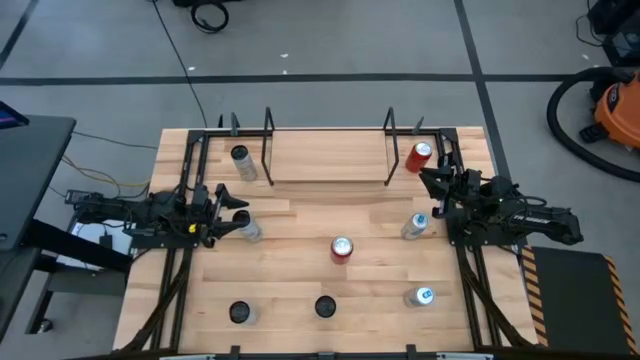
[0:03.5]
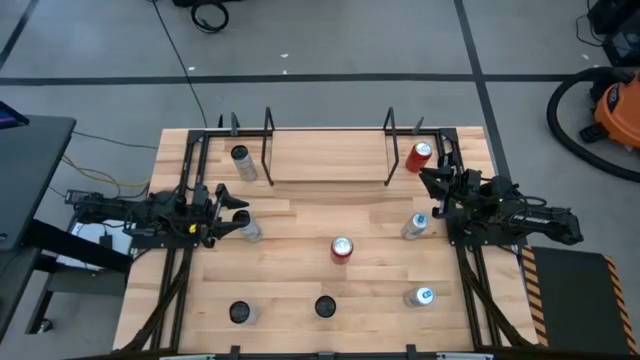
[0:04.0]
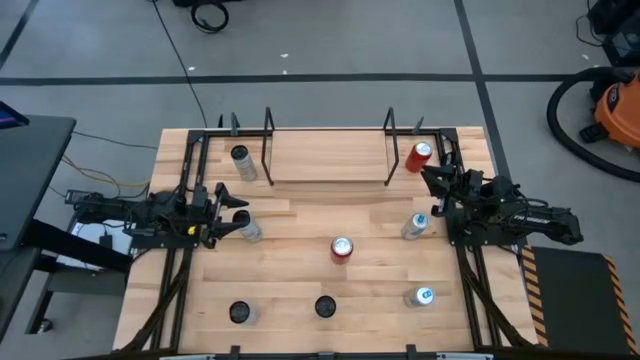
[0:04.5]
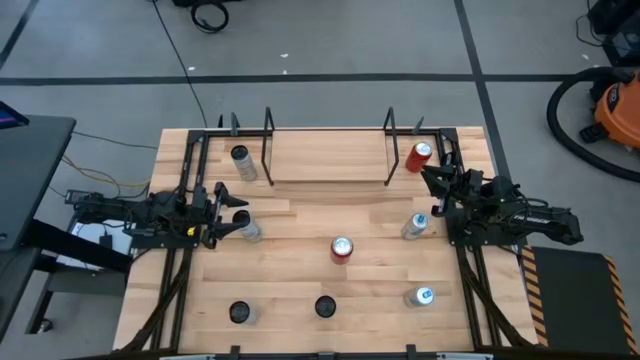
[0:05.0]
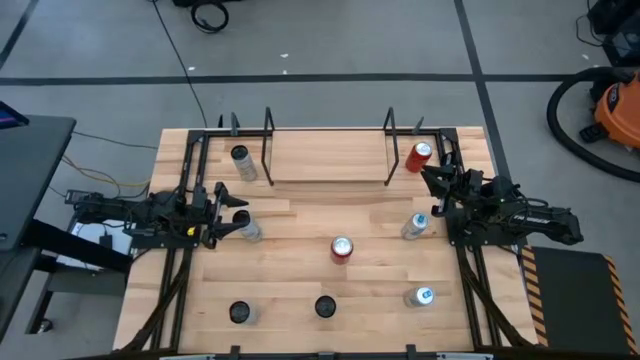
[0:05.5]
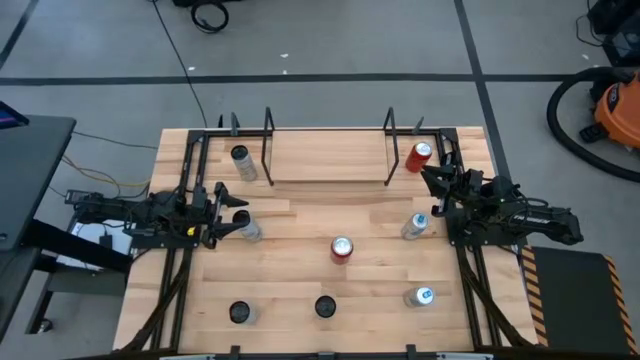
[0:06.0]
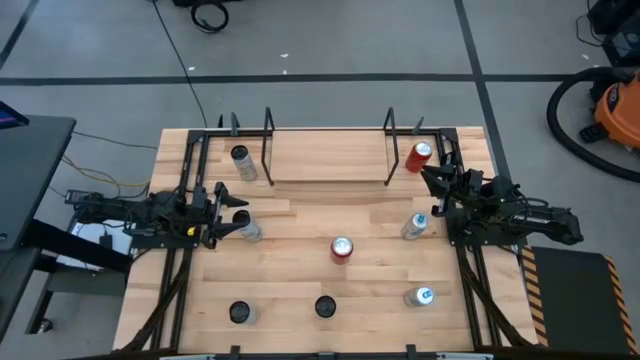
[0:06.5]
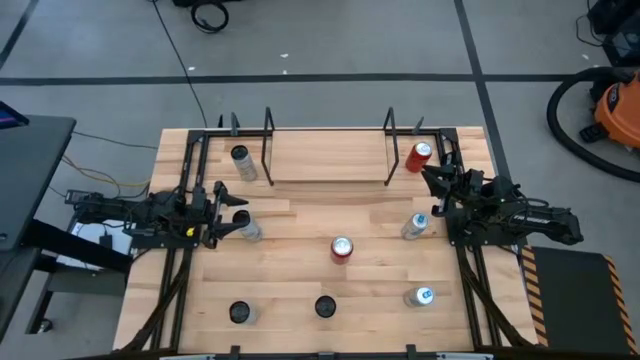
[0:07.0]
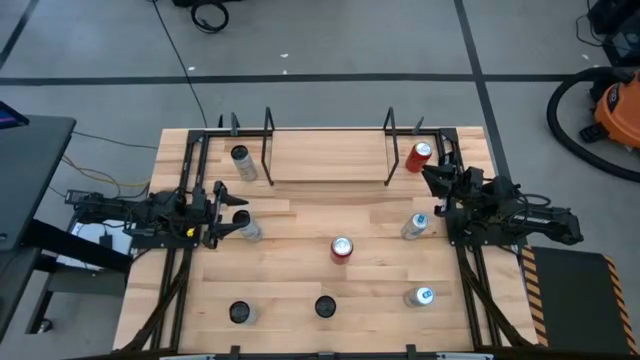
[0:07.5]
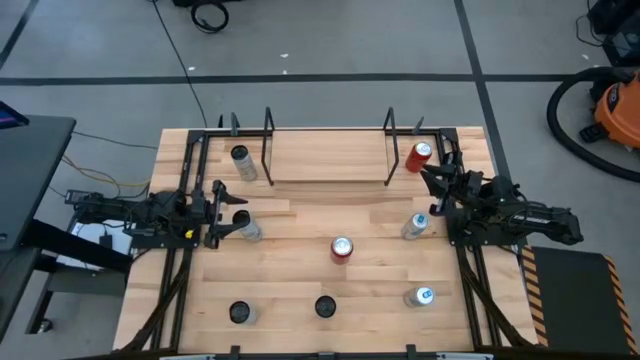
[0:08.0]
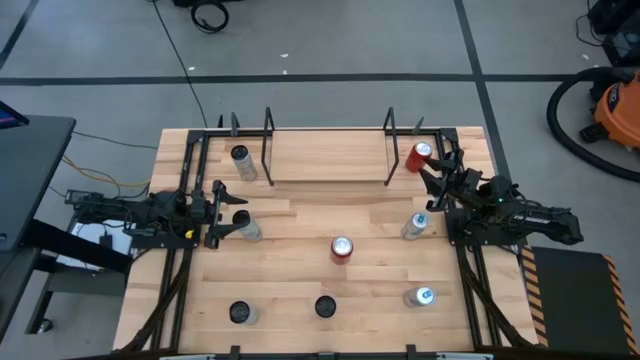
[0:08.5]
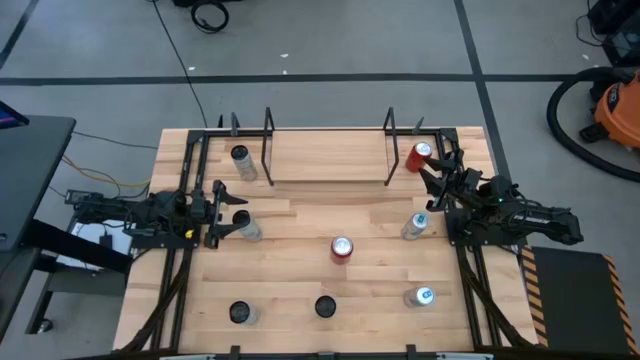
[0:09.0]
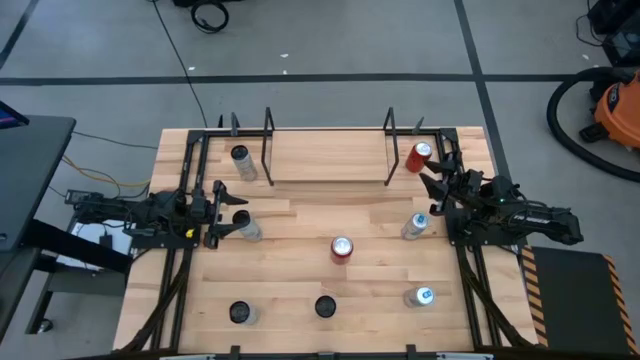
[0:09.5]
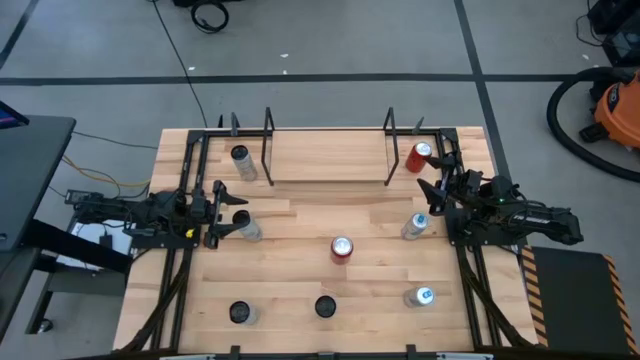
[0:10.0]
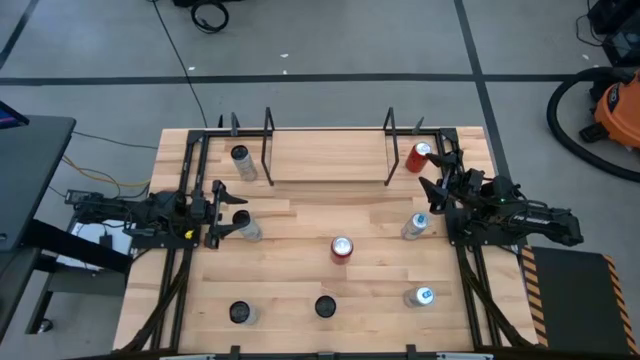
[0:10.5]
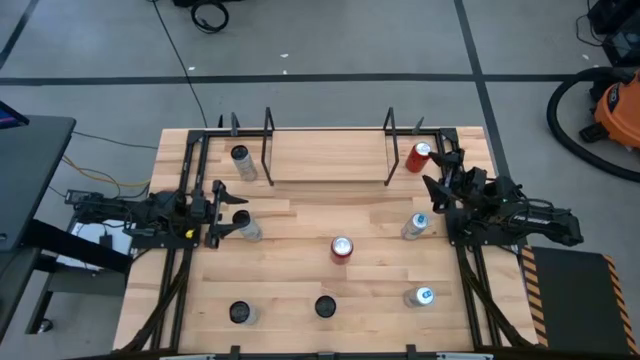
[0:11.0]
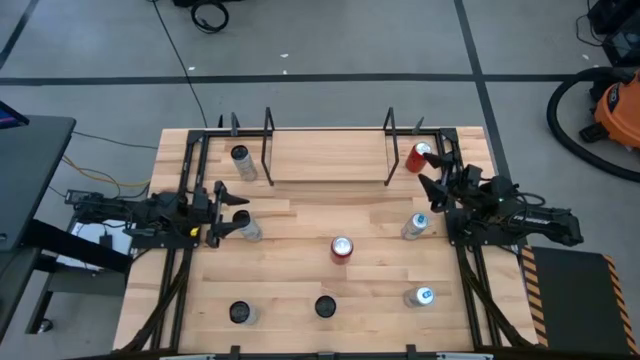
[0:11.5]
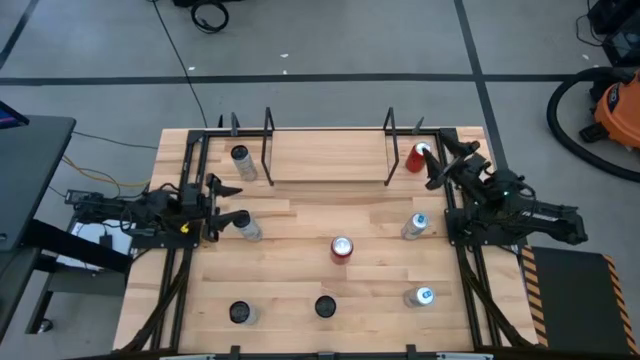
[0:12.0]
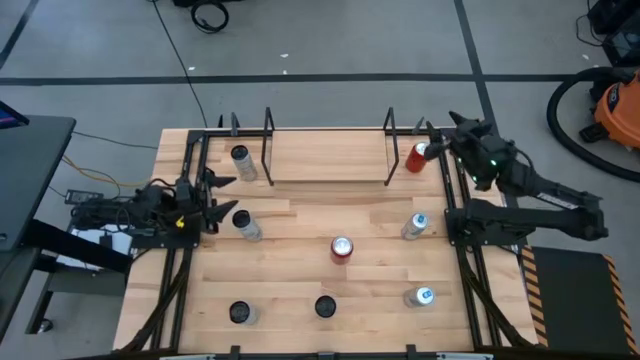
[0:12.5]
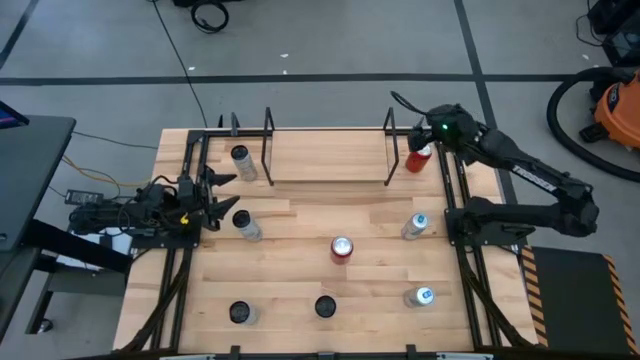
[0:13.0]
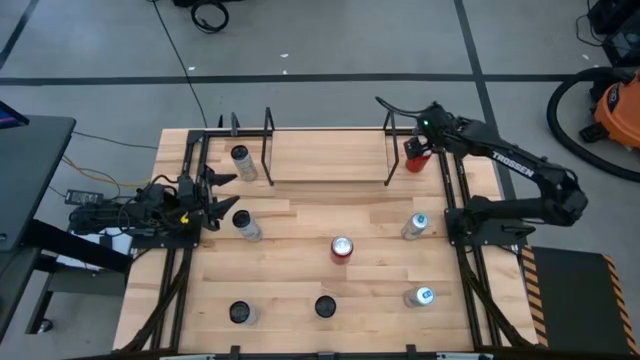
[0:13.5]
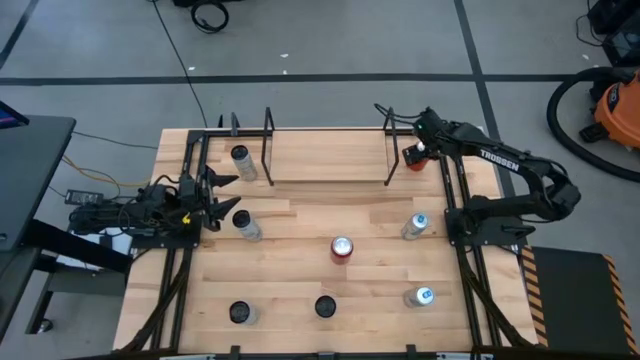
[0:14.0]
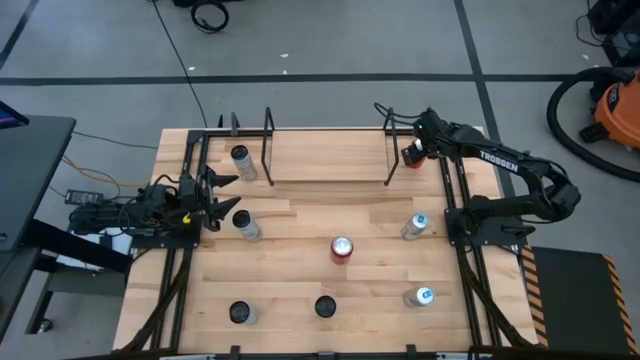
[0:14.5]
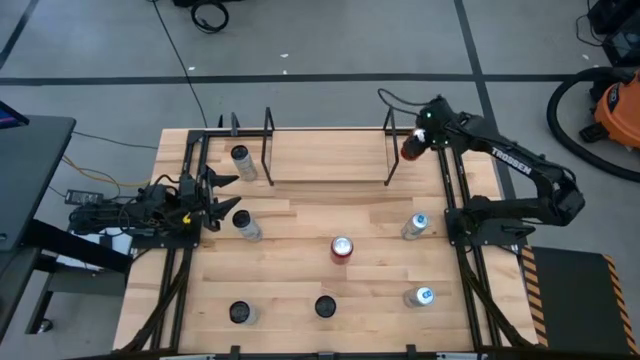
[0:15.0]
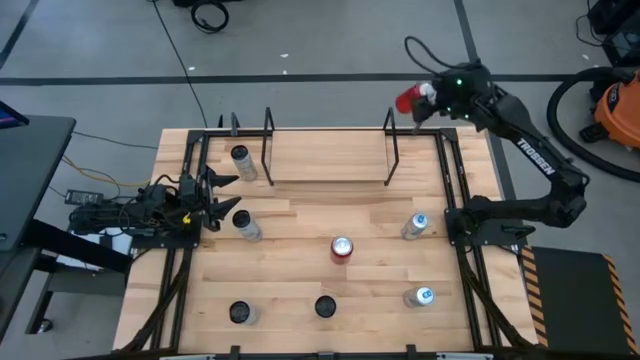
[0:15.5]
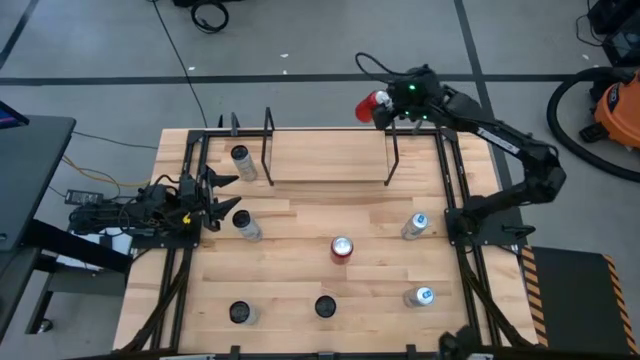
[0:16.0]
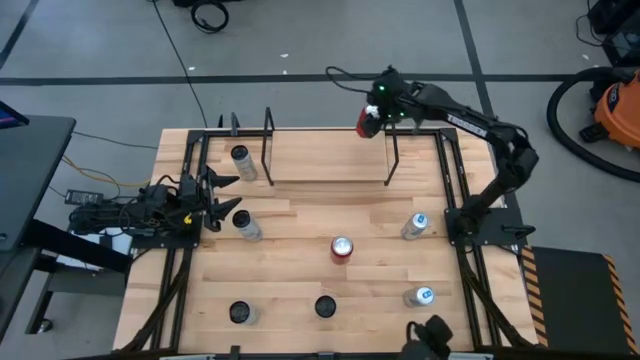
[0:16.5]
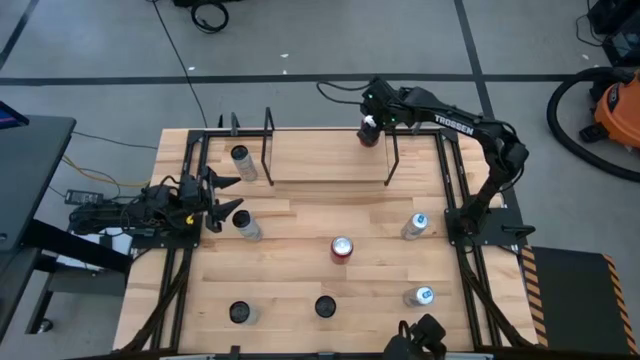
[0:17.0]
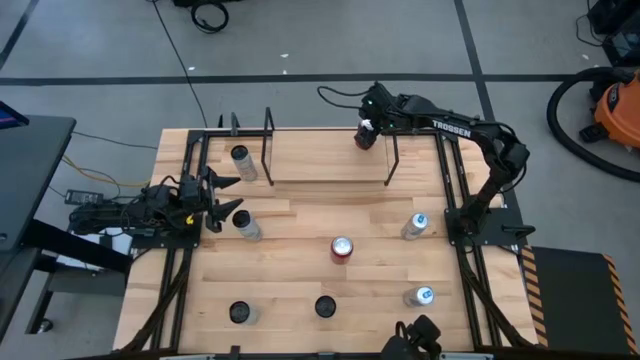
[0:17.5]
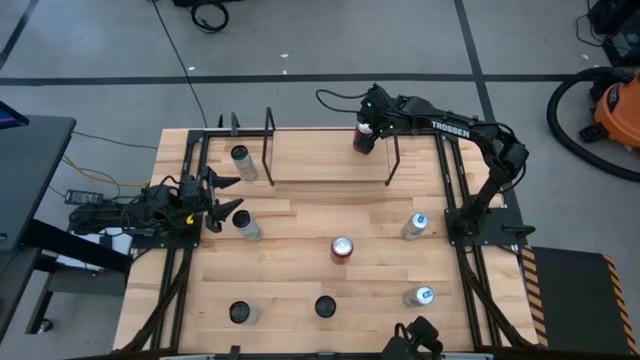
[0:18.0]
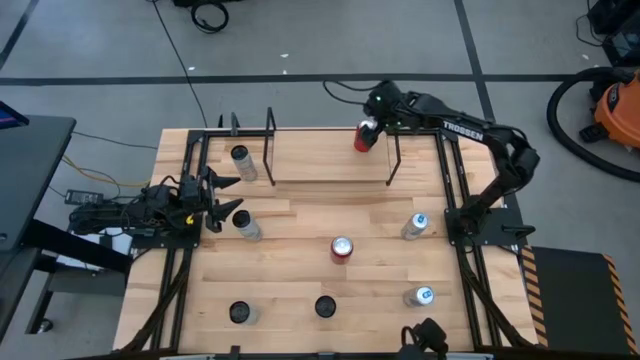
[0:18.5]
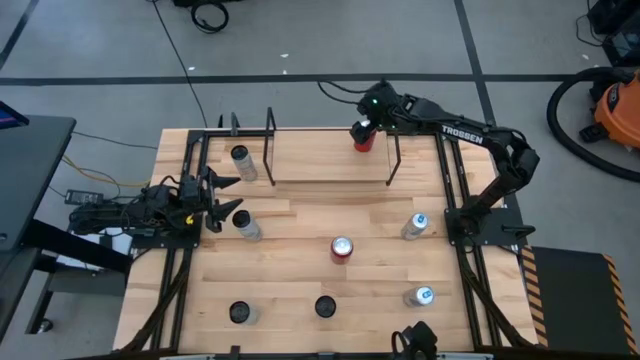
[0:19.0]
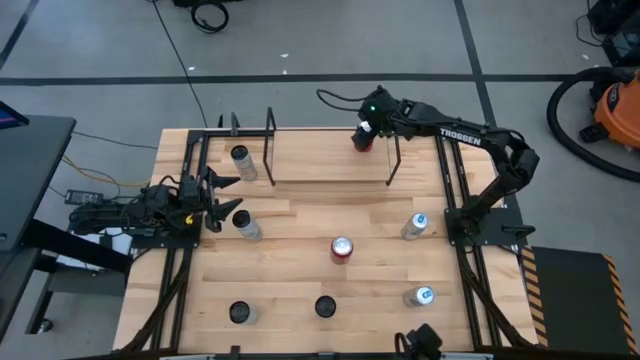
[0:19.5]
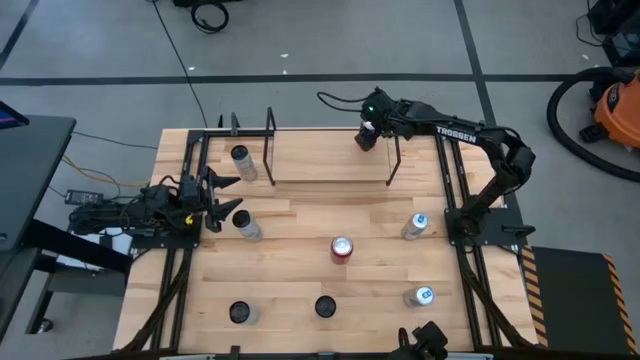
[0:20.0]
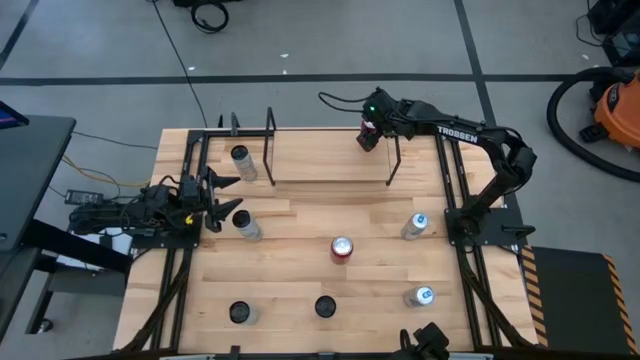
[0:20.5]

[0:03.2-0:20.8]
Task: Place canned beverage on shelf
Put the top red soda can on the shelf

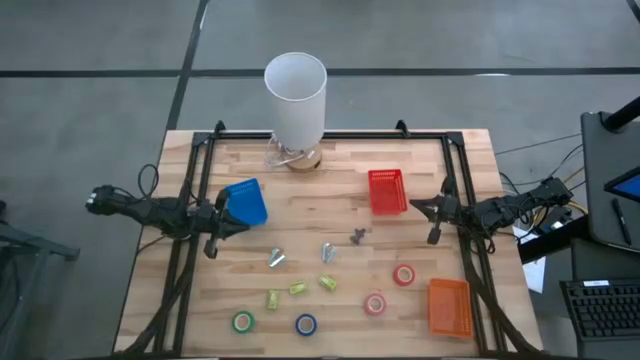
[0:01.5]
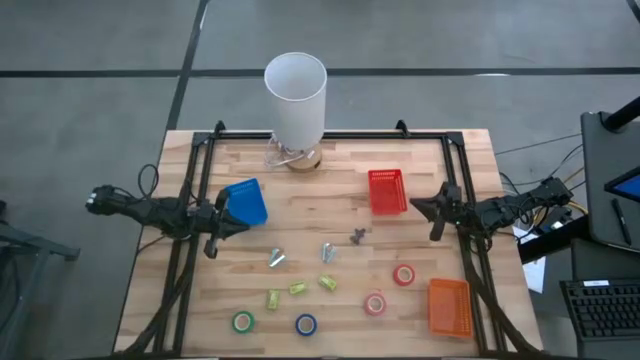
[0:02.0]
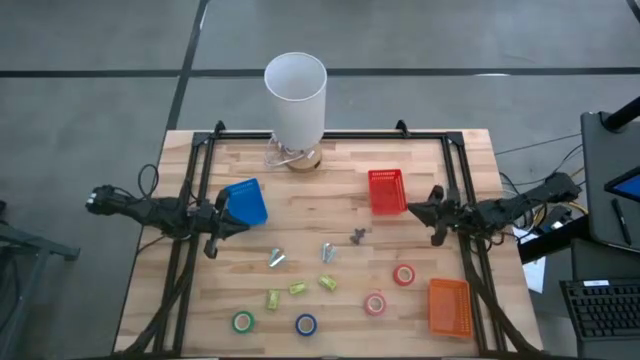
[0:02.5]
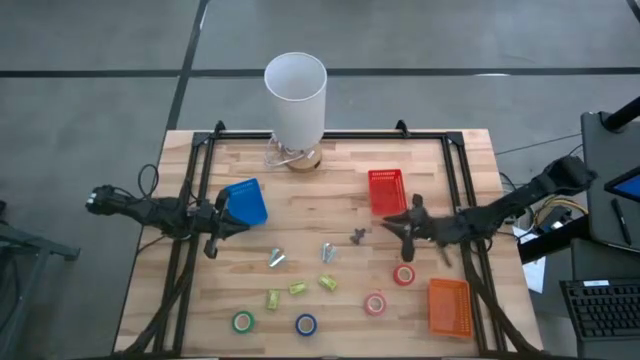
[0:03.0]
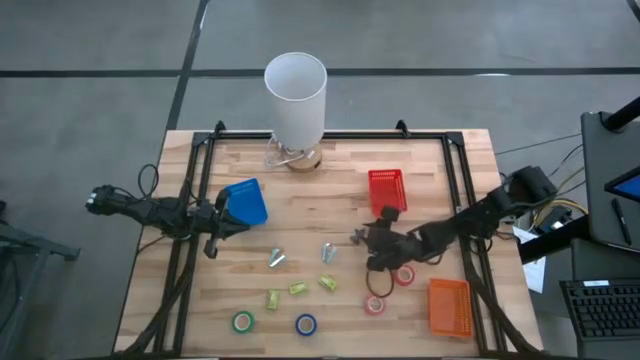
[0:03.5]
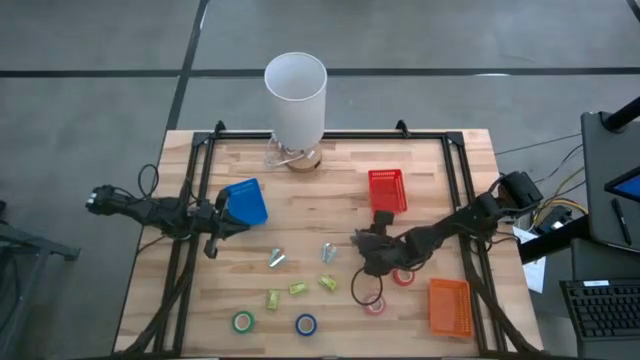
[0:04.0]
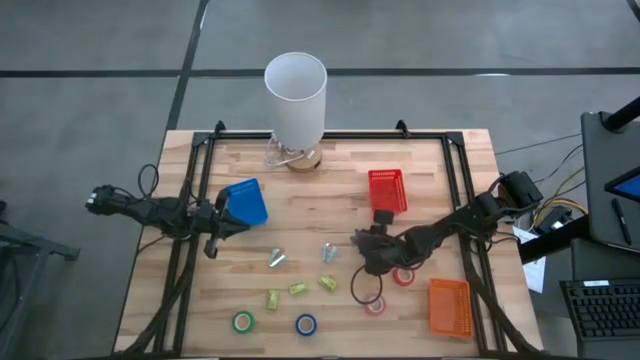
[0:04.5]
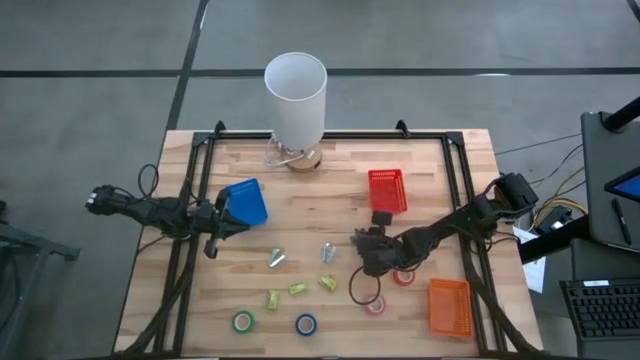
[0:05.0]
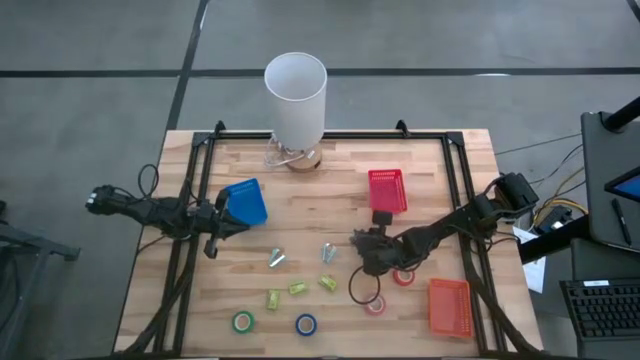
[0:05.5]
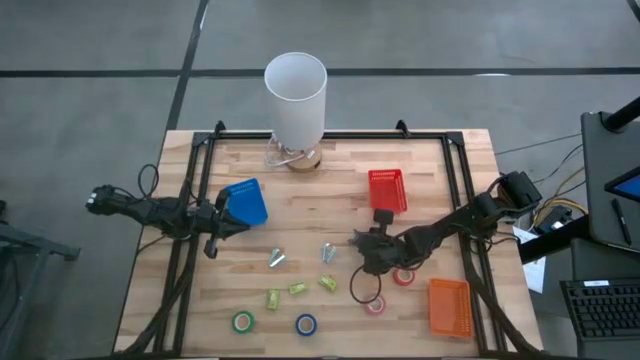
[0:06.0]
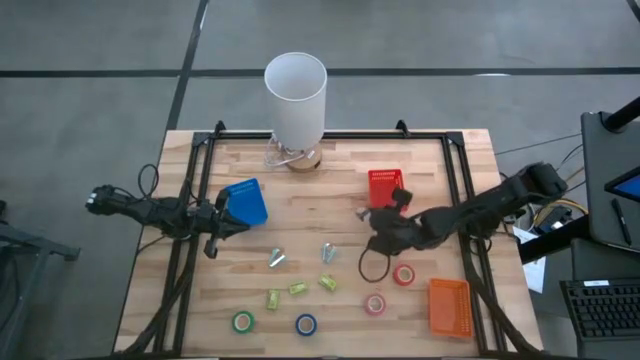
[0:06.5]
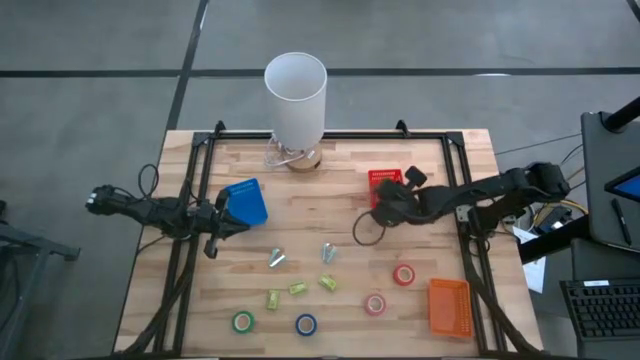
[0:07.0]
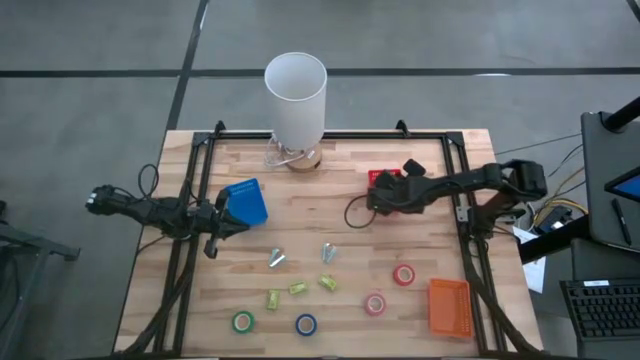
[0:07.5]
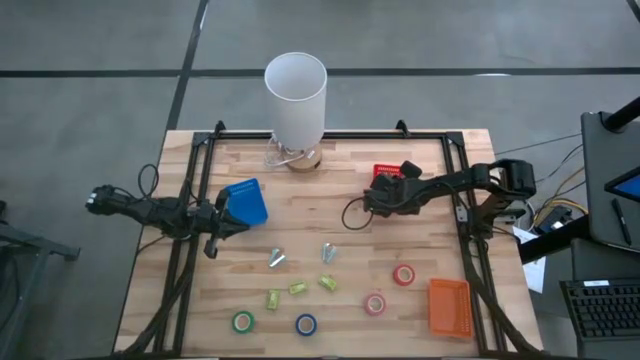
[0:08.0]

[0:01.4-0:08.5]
Task: Pick and place Stapler, Stapler remover, tape
Put the black staple remover into the red basket
